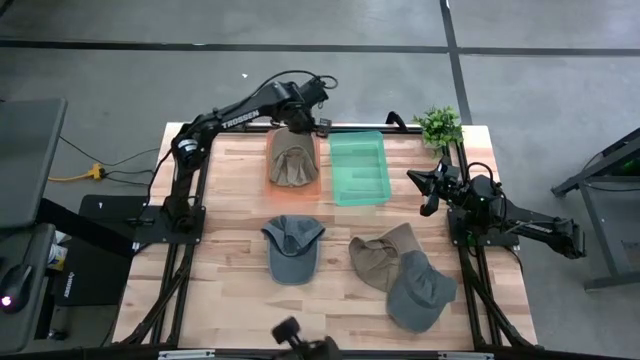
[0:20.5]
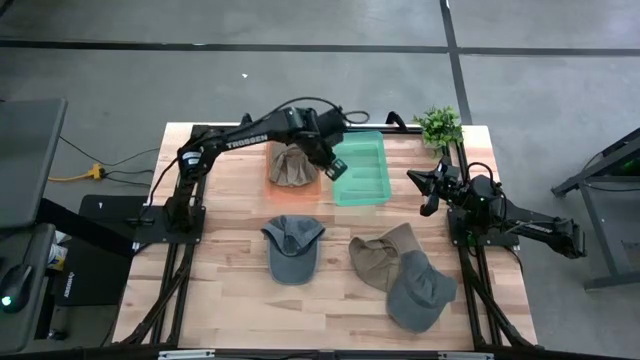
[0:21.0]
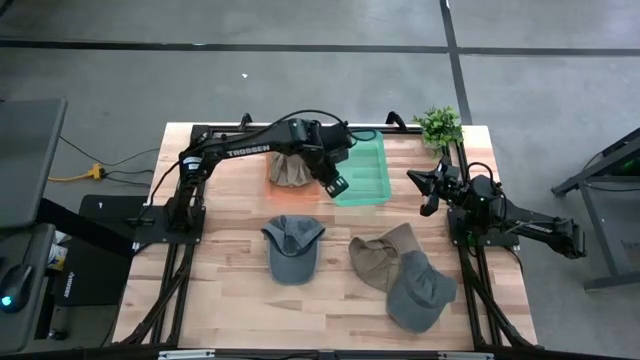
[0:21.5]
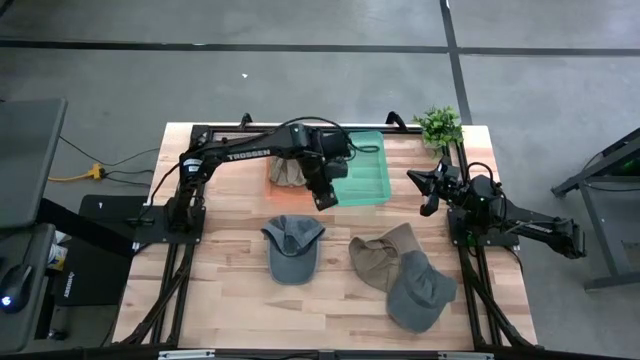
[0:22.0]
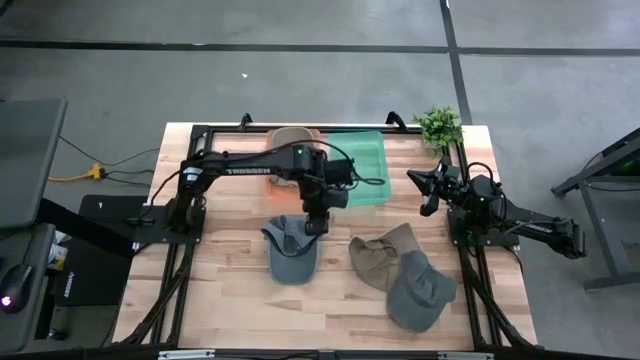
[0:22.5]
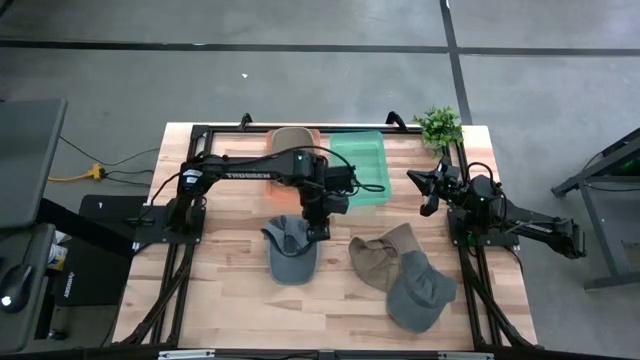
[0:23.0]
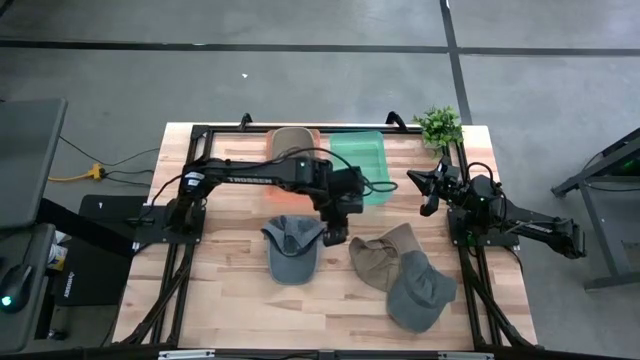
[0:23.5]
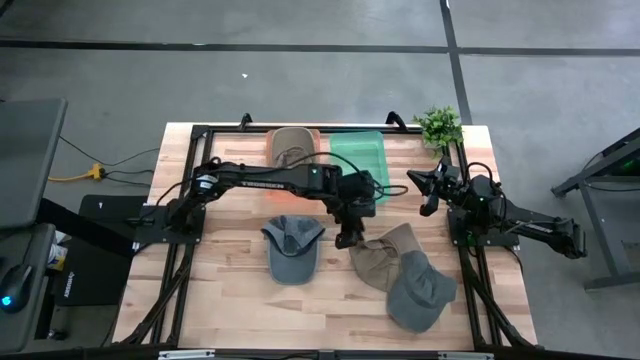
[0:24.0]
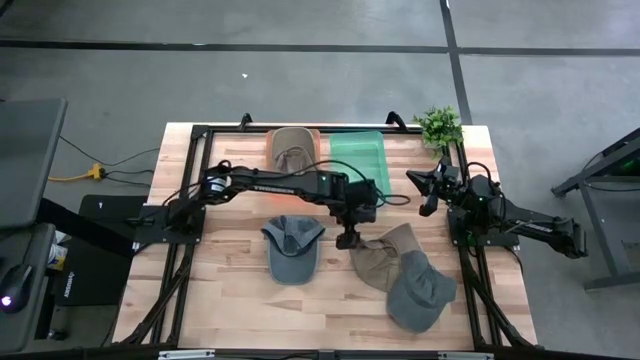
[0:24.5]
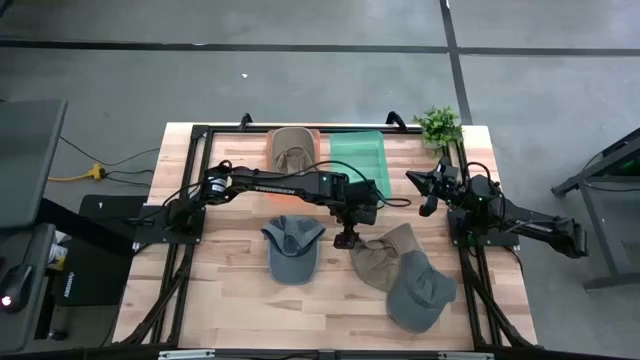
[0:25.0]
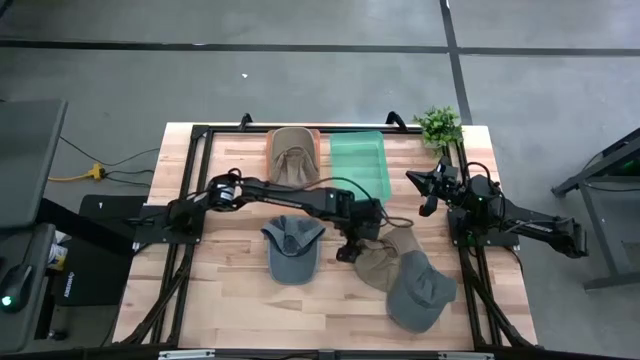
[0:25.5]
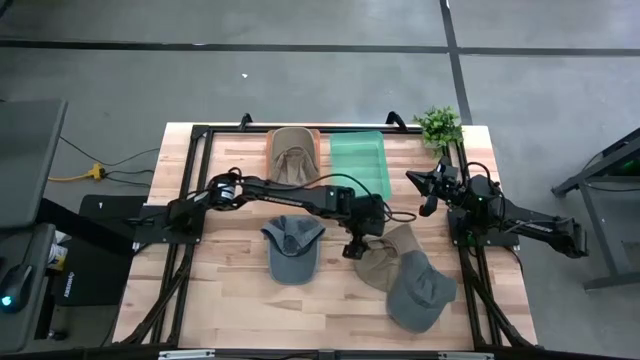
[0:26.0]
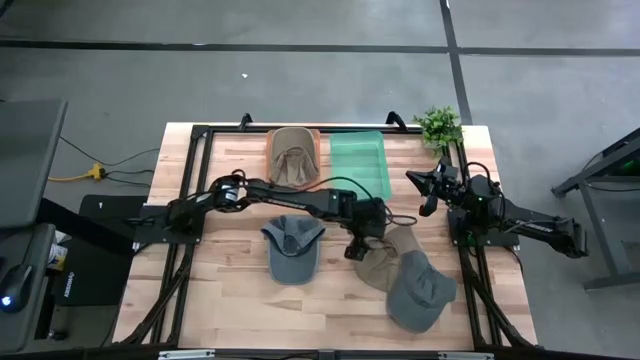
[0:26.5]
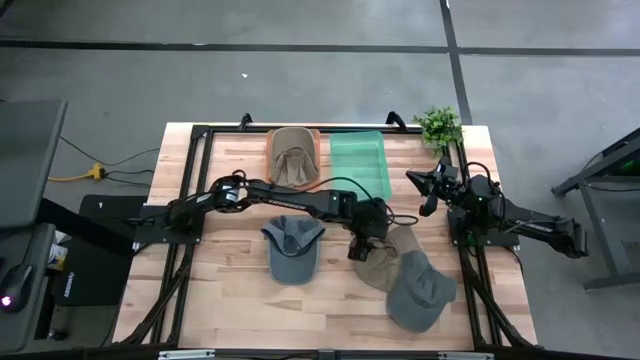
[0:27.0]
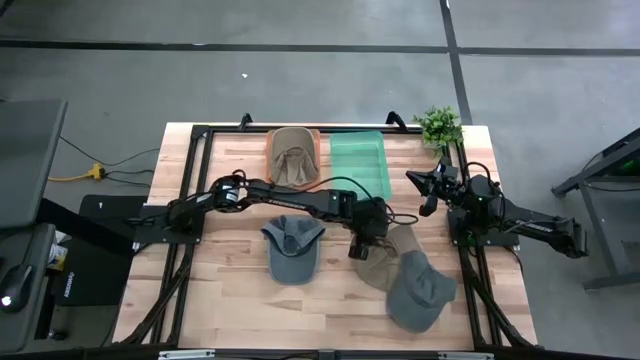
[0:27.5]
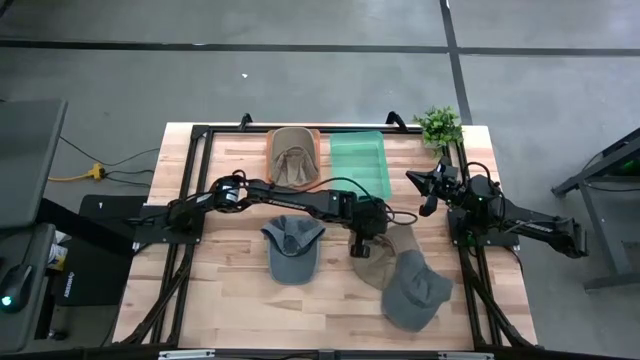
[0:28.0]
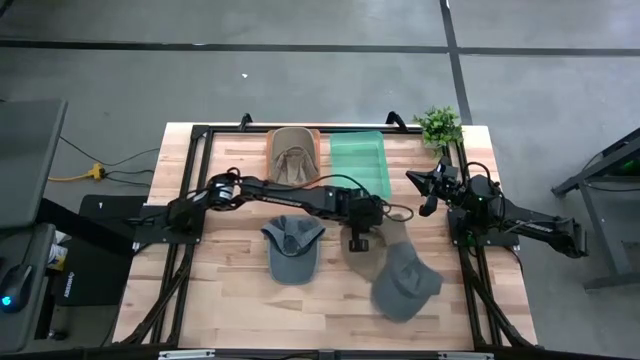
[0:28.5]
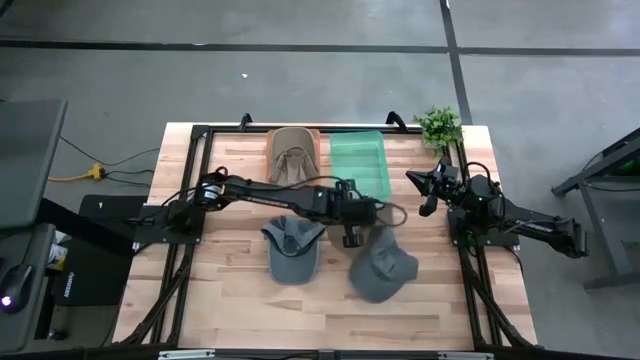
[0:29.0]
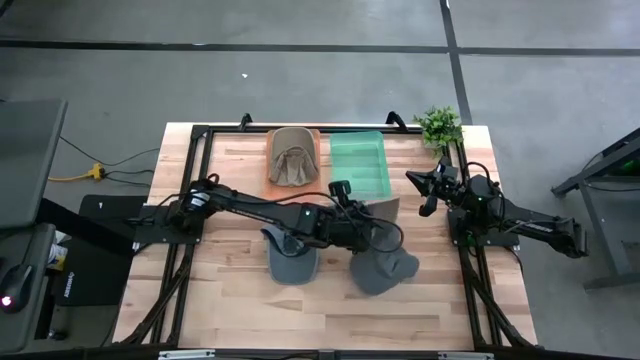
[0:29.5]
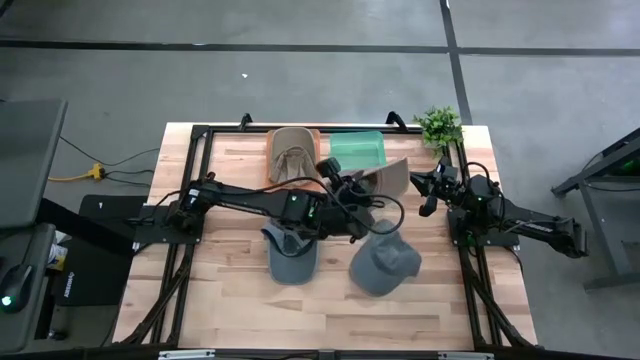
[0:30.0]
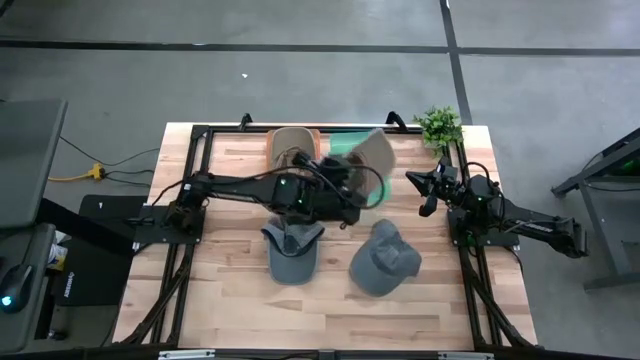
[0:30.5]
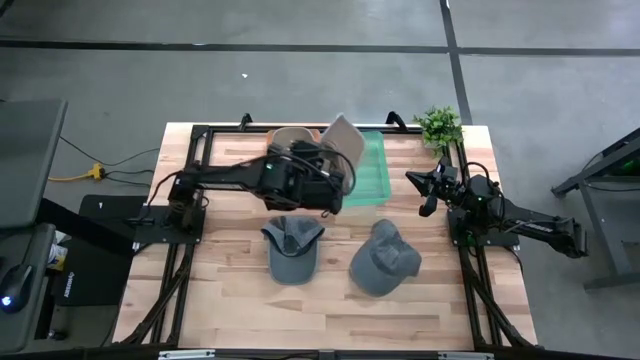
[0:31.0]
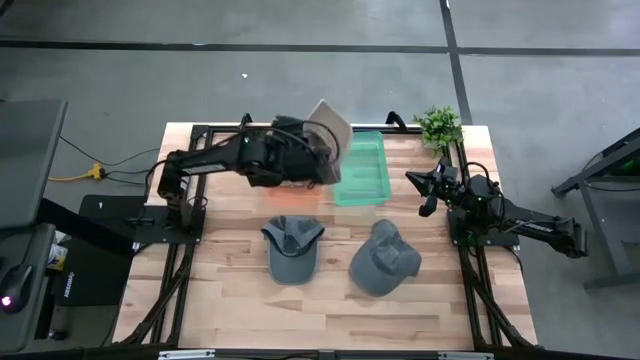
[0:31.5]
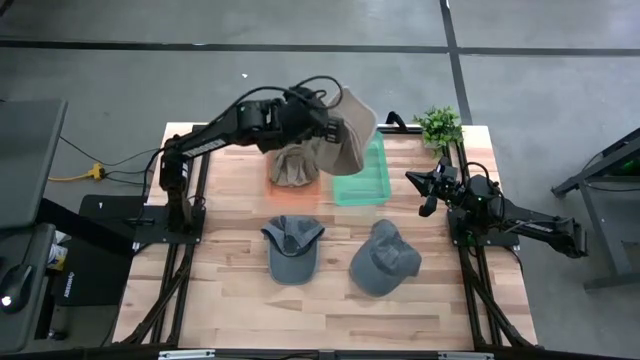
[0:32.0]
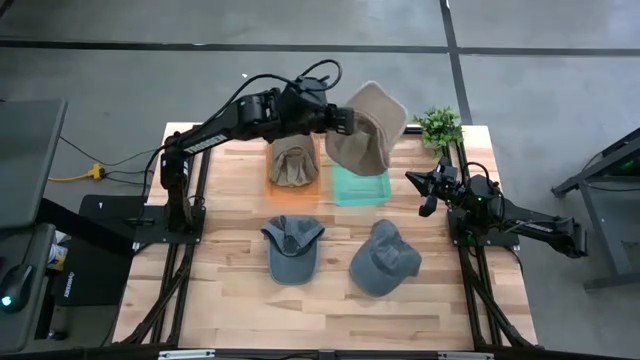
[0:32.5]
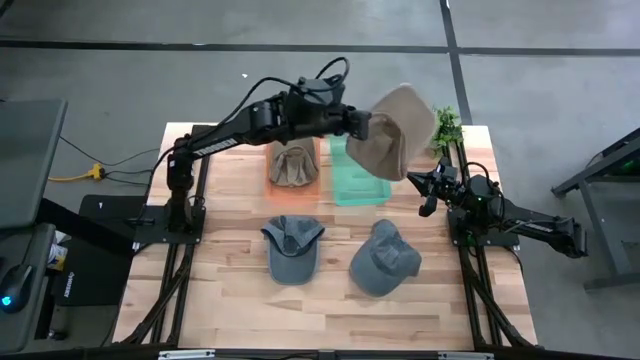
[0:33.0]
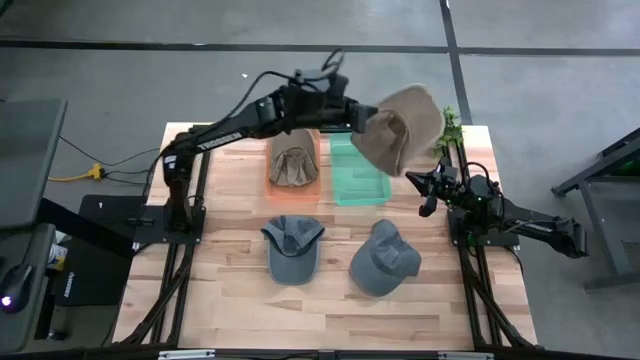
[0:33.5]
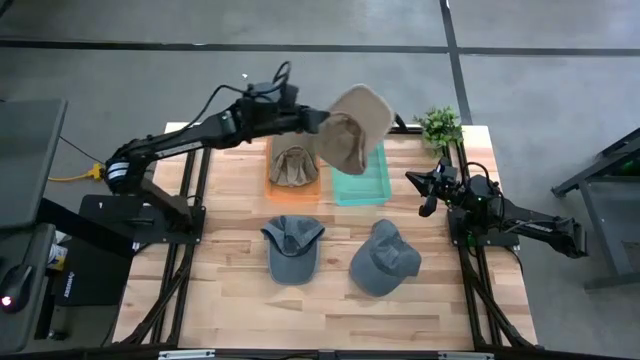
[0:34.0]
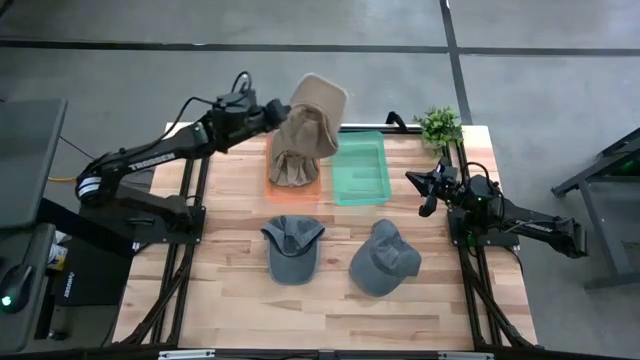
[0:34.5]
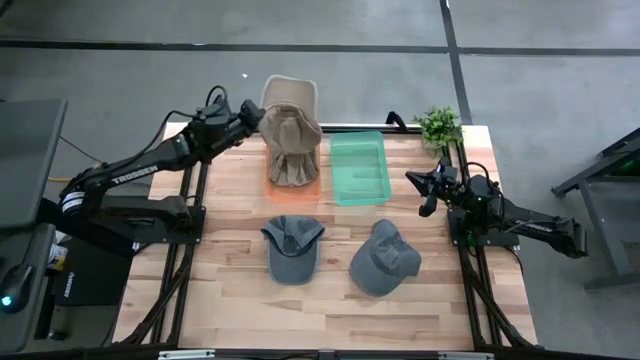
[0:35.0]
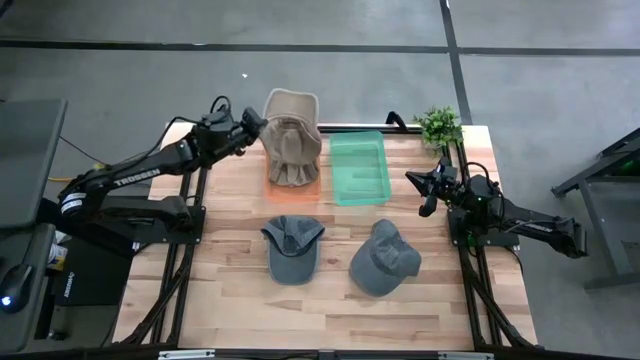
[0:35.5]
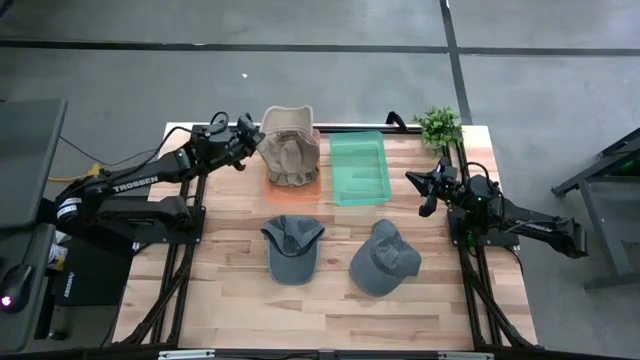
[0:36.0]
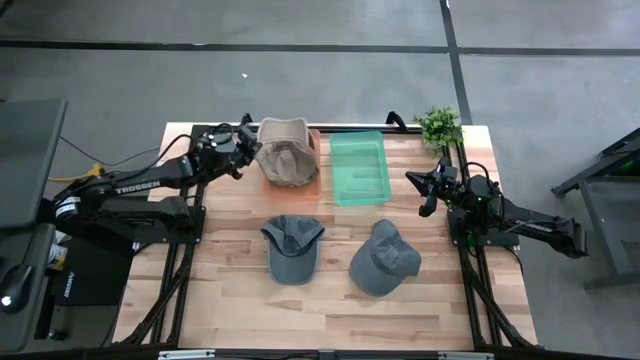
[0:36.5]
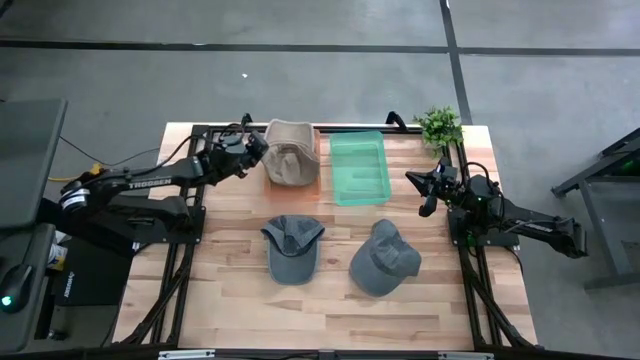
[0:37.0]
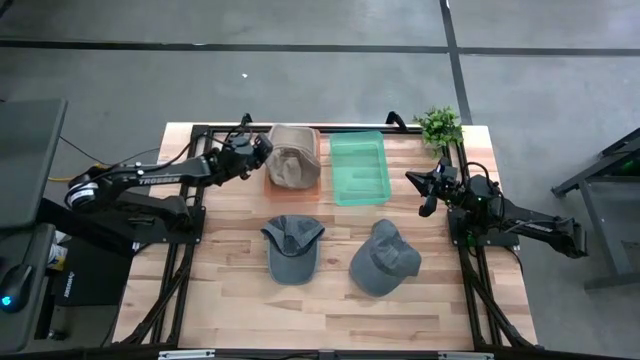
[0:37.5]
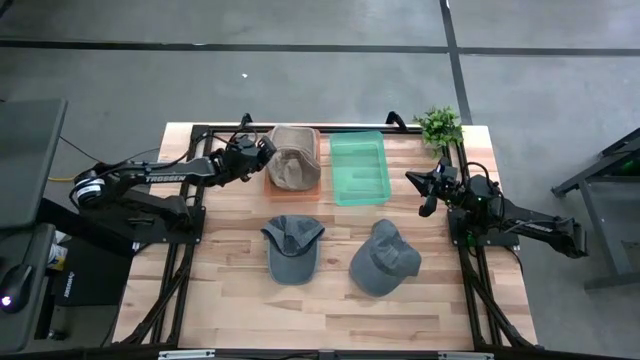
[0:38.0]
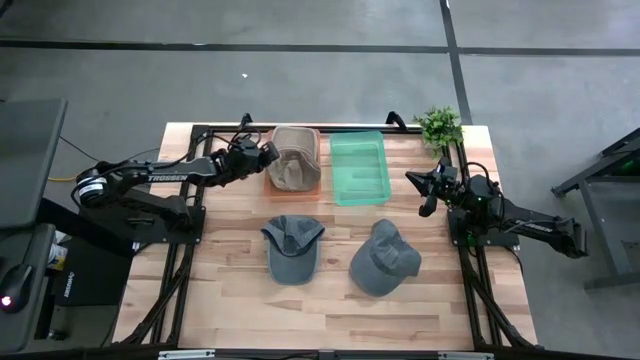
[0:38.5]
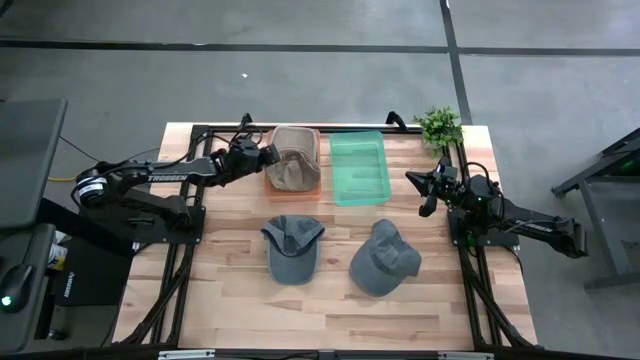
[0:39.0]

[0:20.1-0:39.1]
Task: Pick & Place hat
Put the brown cap into the orange bin
